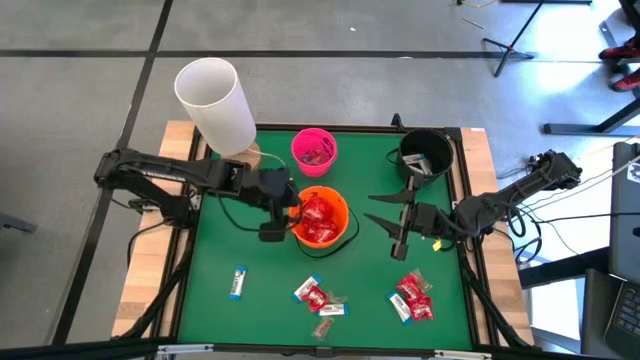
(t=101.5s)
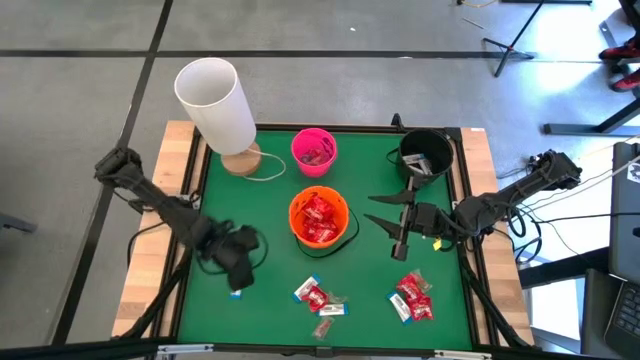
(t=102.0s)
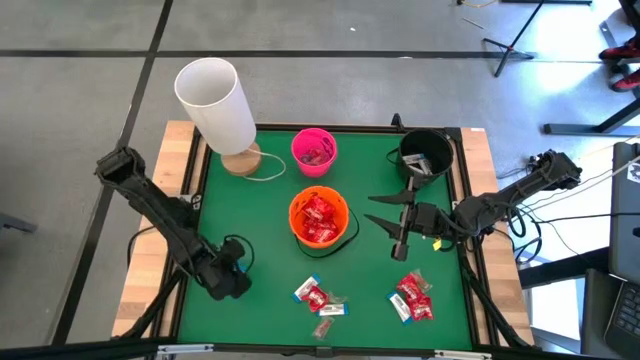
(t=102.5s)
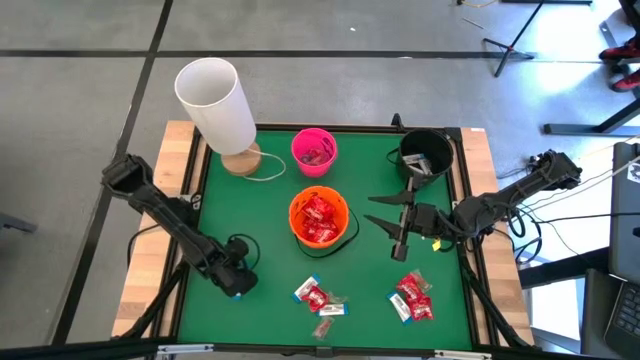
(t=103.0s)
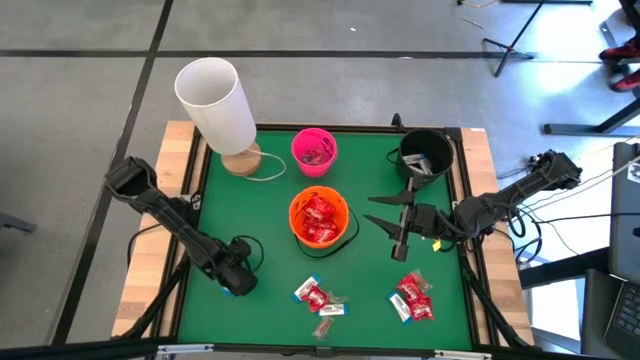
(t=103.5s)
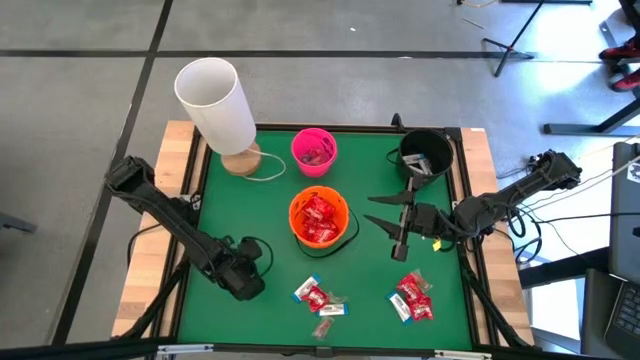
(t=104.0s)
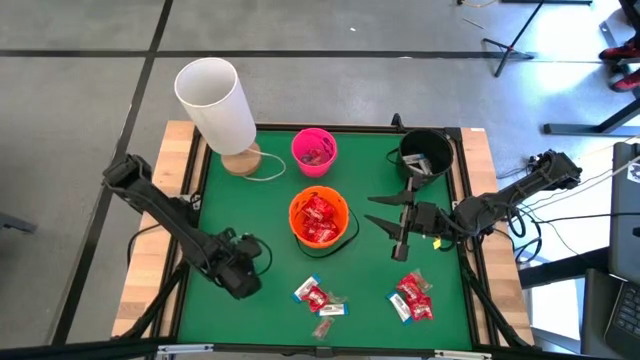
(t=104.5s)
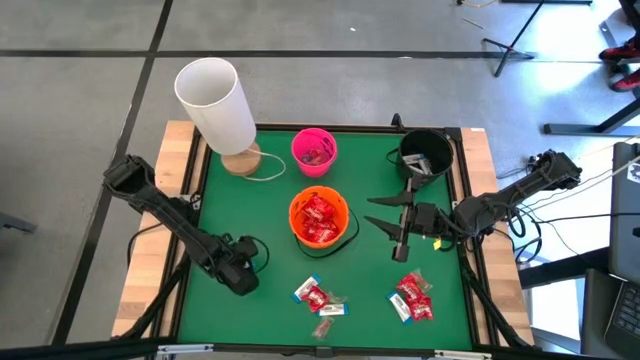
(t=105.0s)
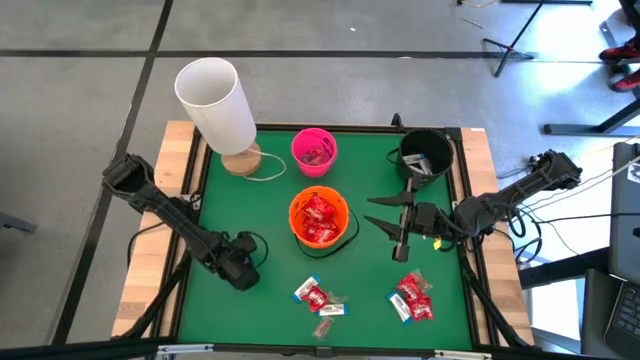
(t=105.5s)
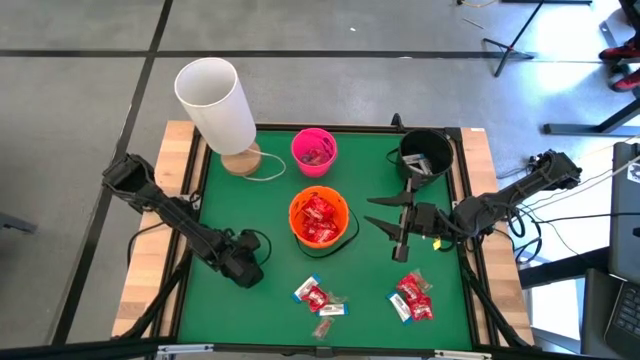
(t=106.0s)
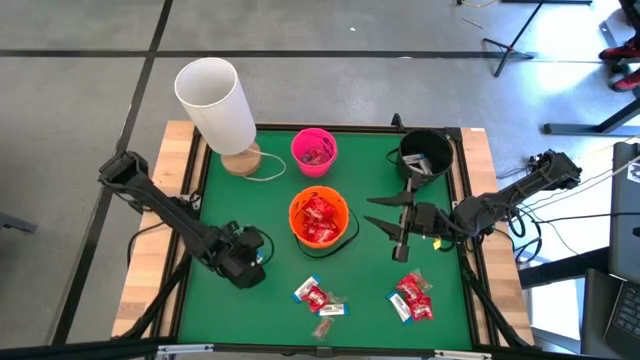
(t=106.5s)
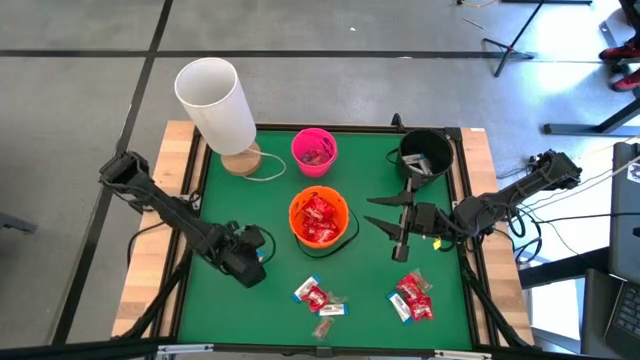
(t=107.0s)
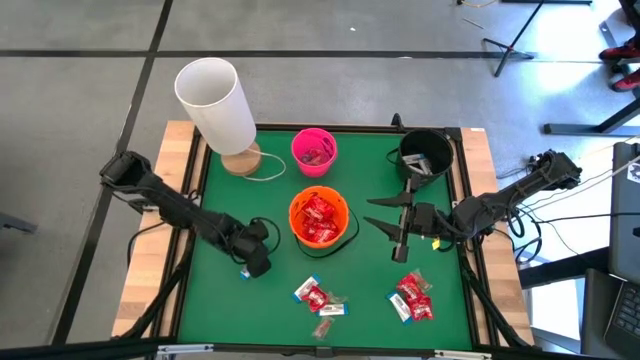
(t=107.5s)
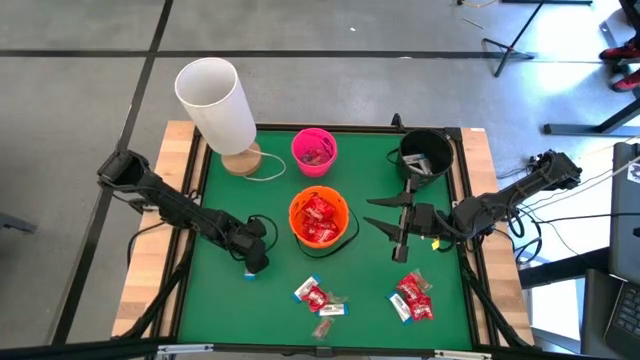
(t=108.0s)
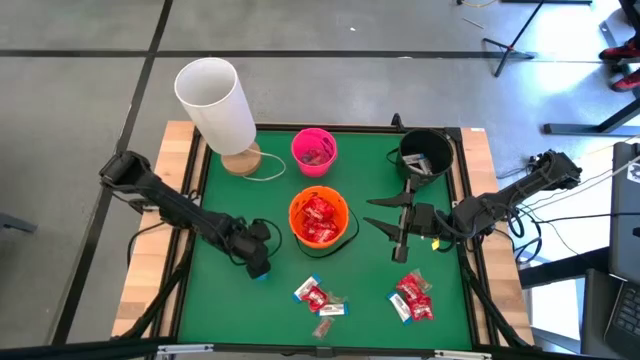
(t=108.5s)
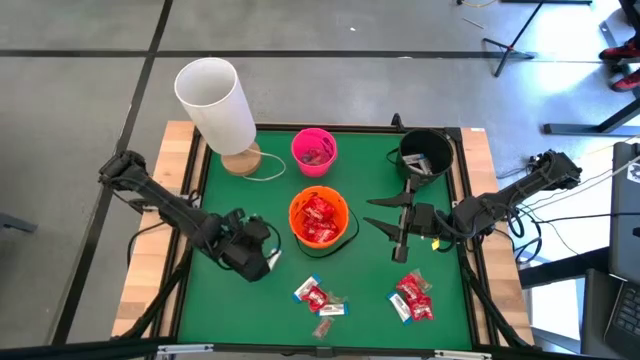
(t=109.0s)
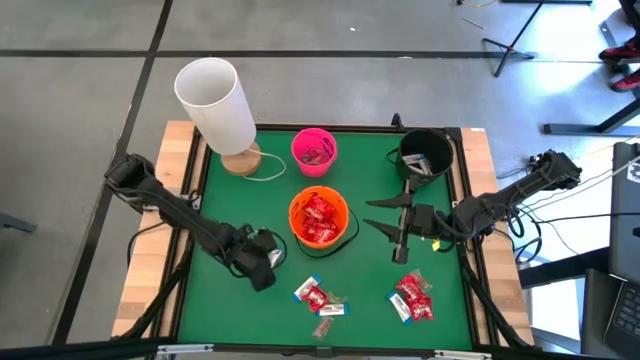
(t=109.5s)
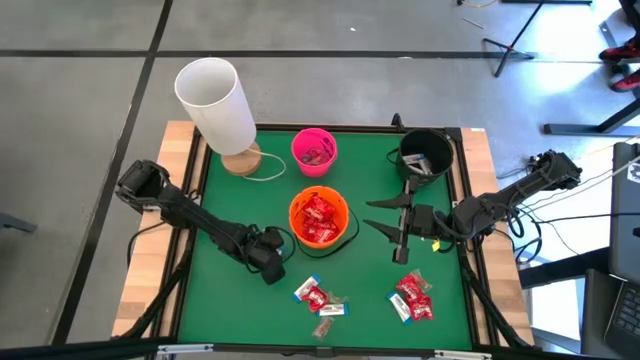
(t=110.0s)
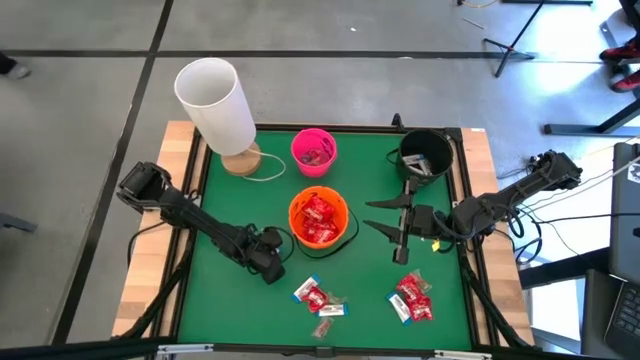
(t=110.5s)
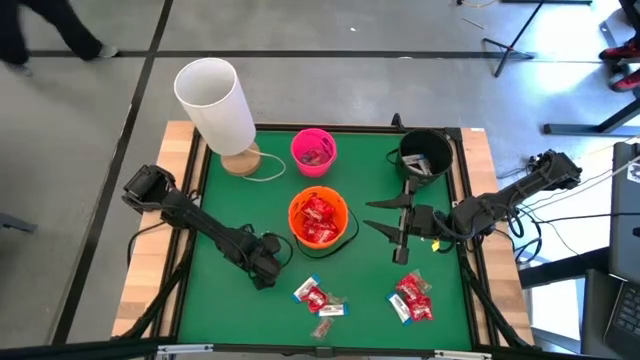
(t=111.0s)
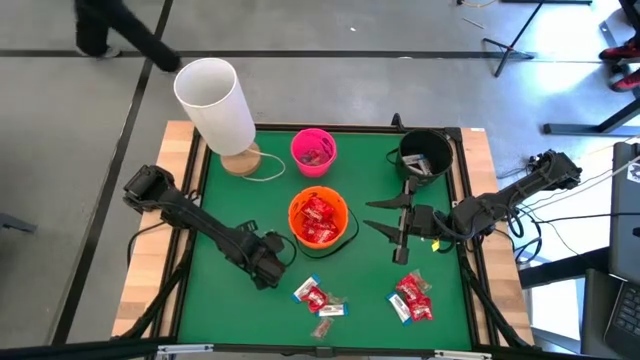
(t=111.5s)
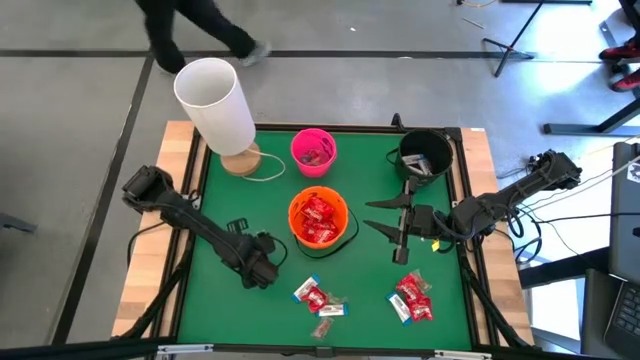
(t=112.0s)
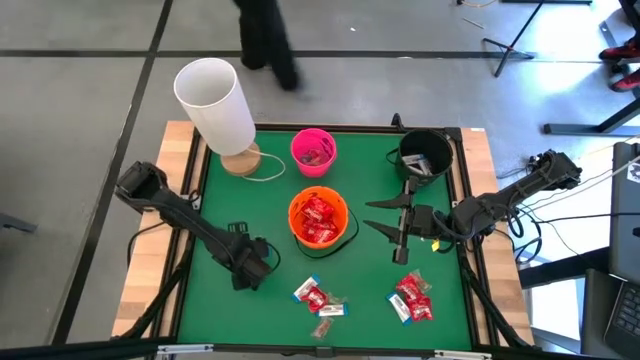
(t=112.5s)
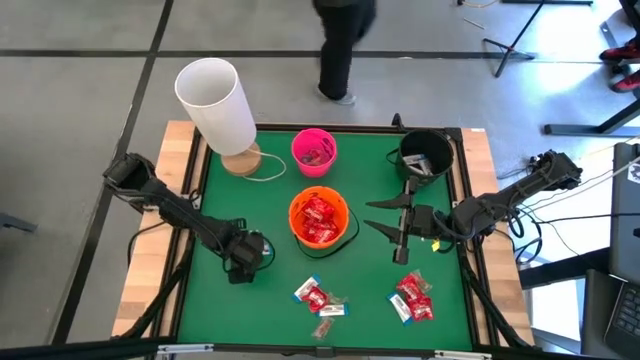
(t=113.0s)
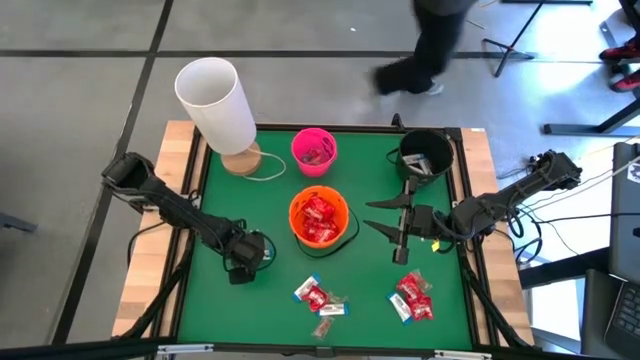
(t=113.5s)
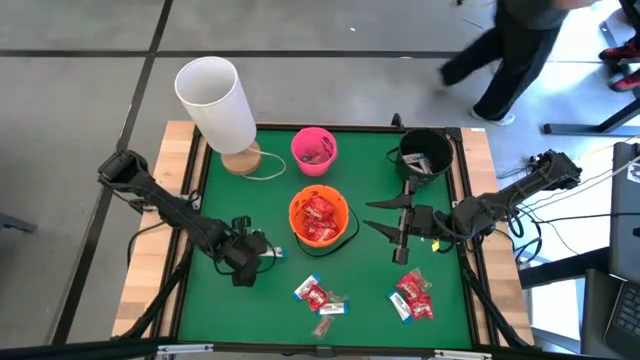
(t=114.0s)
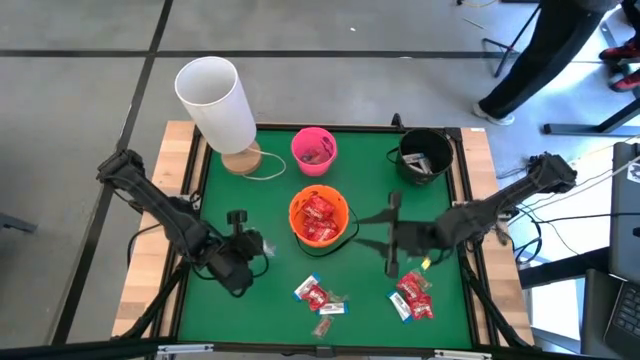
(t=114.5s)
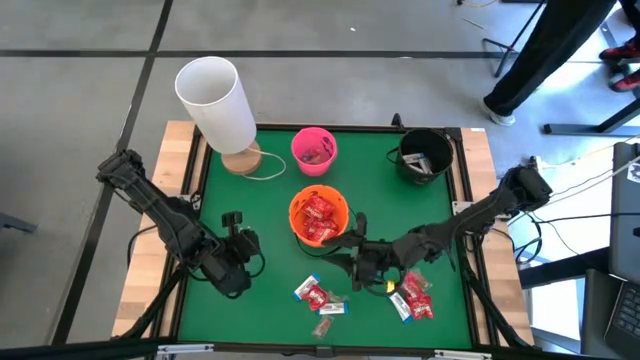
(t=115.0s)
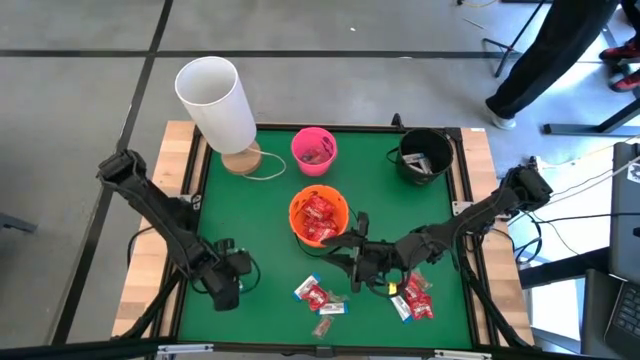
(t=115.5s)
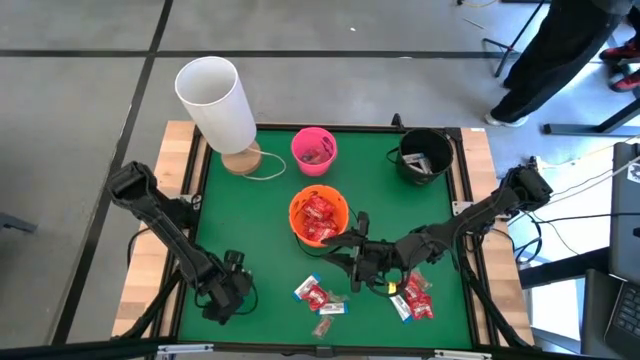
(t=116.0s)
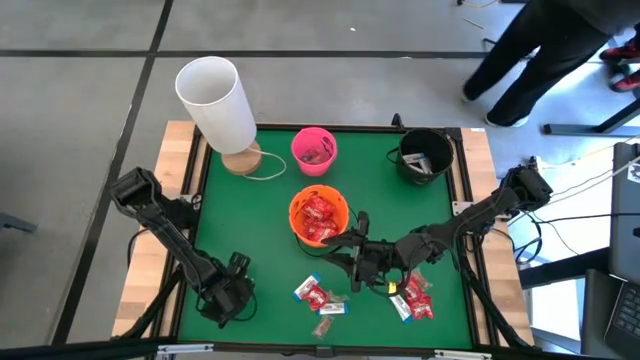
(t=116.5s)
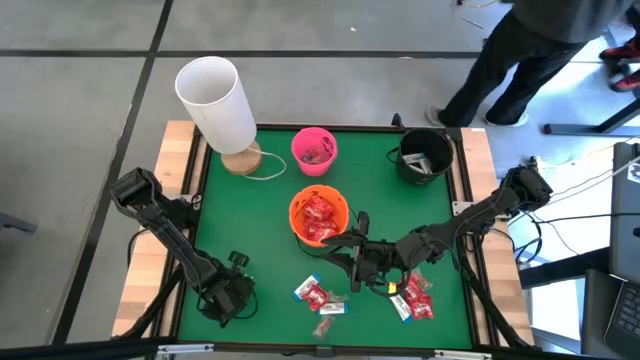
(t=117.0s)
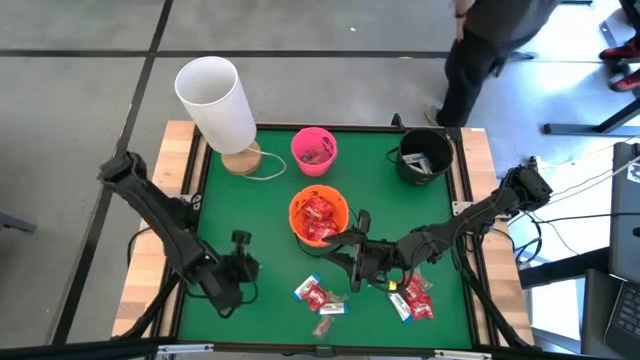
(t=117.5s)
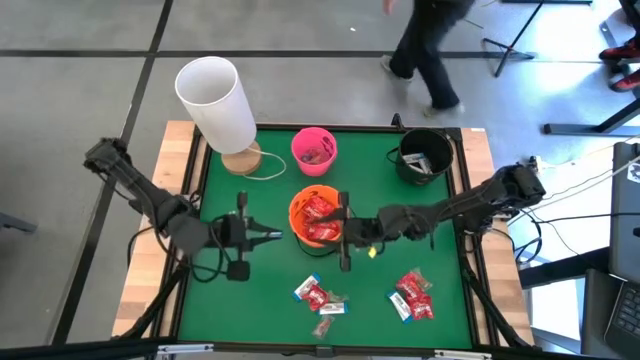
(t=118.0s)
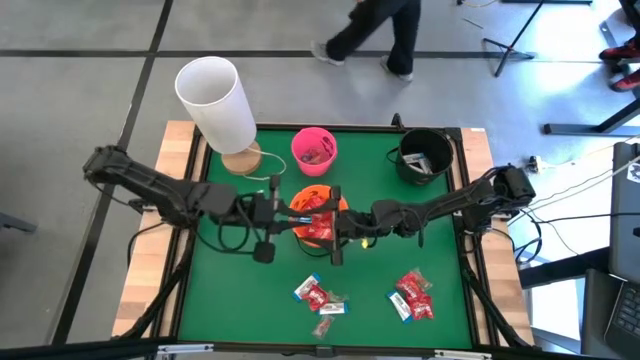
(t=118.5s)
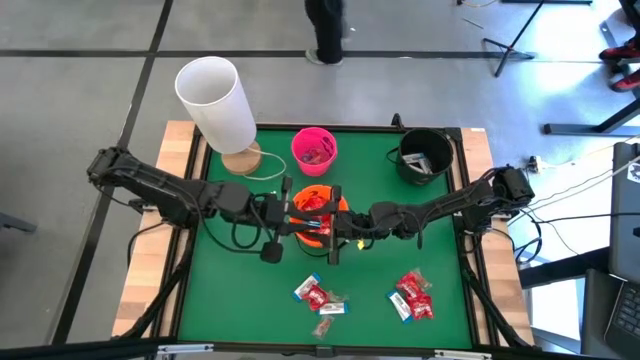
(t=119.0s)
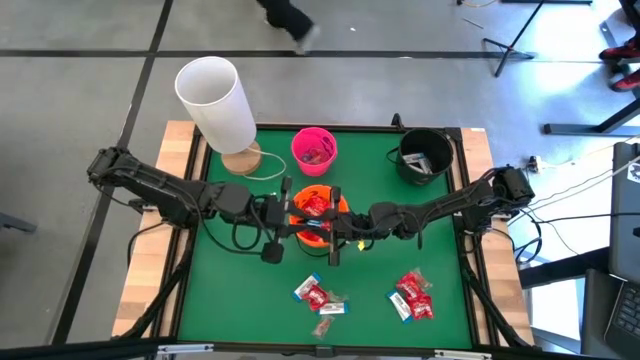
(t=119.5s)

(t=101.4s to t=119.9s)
Task: Sort candy
Put the white candy into the black bucket

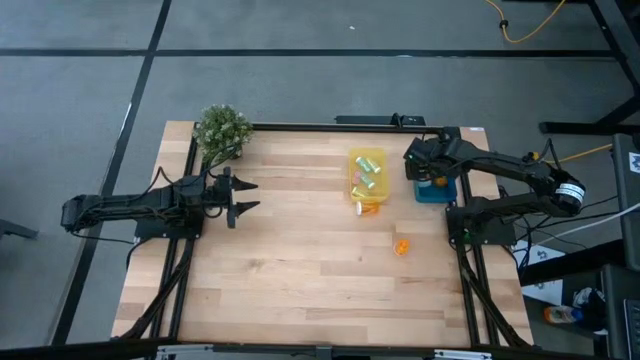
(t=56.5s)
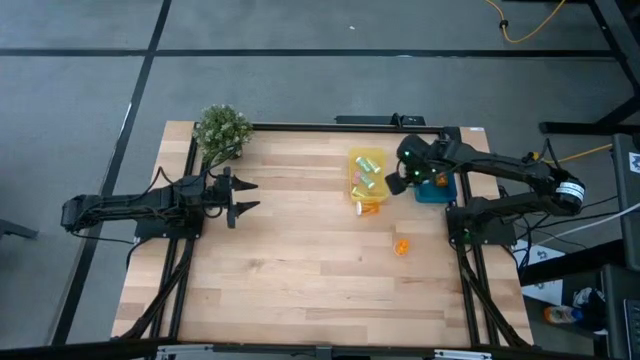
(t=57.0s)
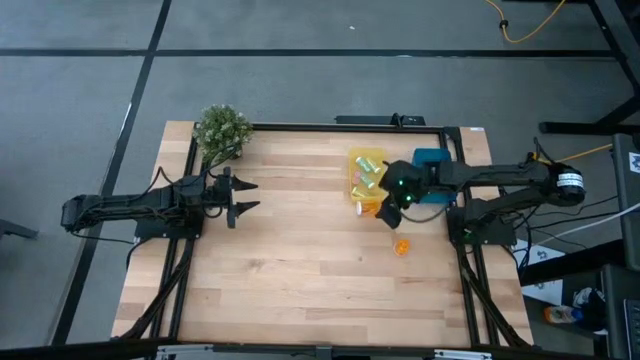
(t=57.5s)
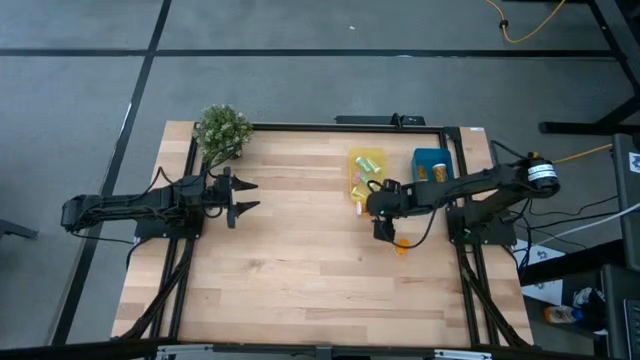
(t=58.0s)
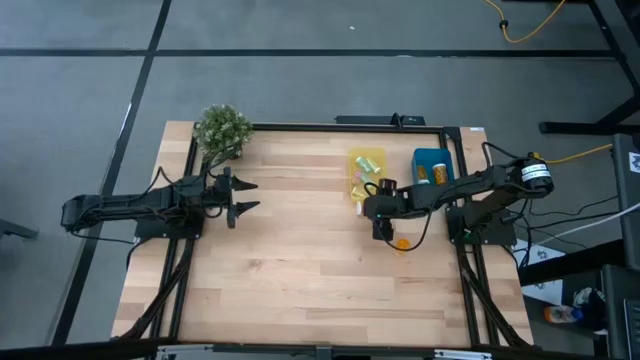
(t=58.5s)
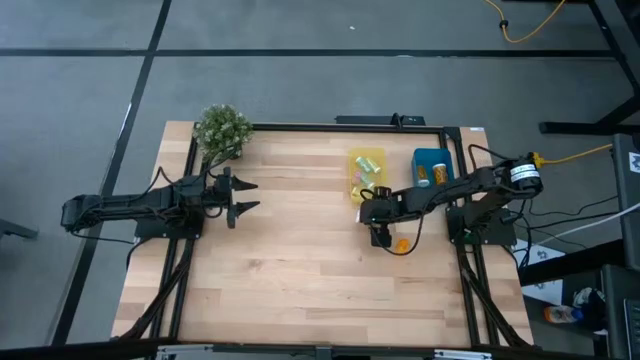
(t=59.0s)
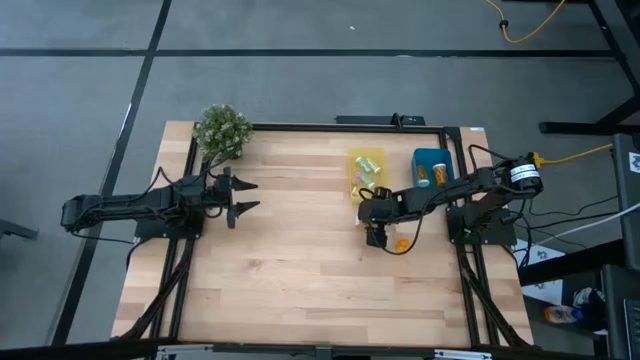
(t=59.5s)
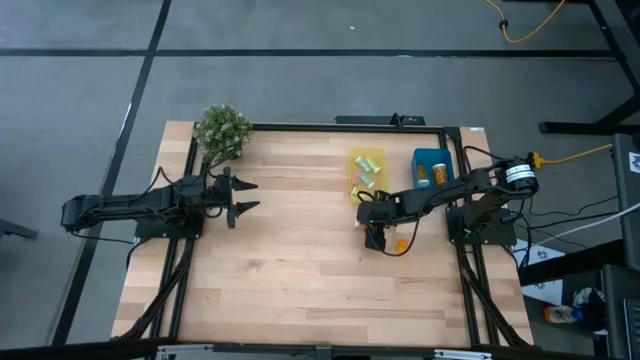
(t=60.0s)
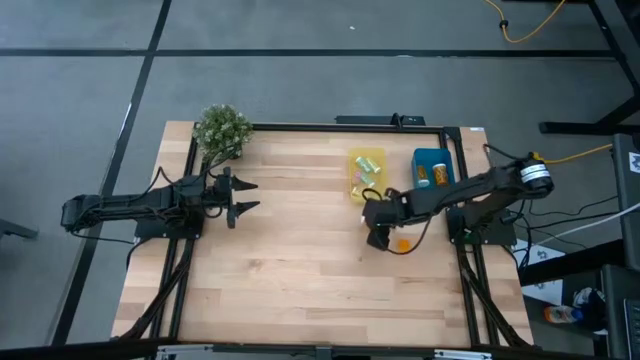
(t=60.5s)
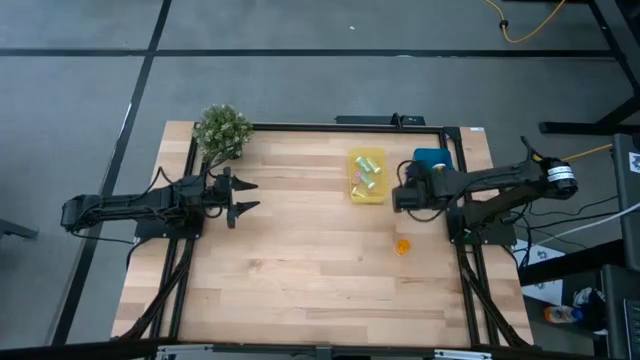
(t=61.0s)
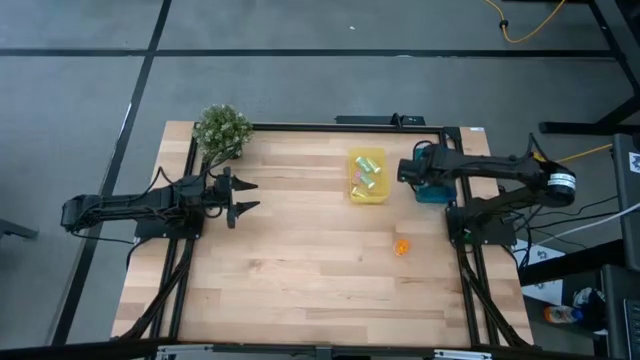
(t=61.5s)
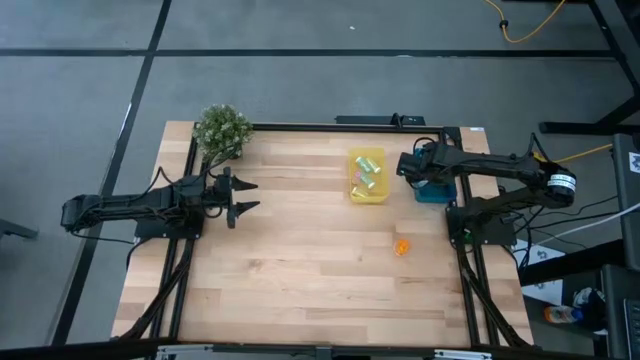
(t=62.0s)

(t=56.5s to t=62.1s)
Task: Pick and place medicine bottles into bin by pill shape (circle, oval)
Put the large orange pill bottle into the blue bin
